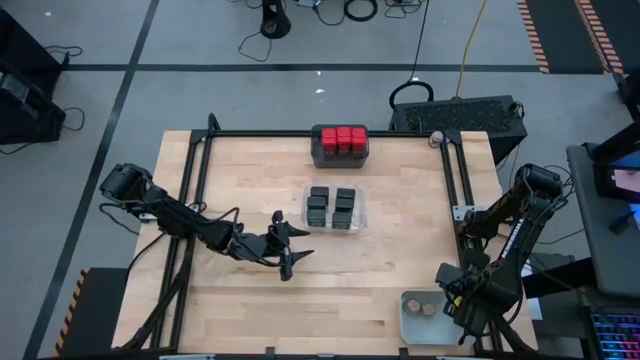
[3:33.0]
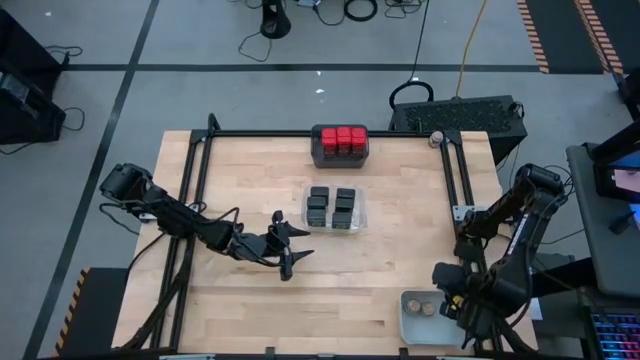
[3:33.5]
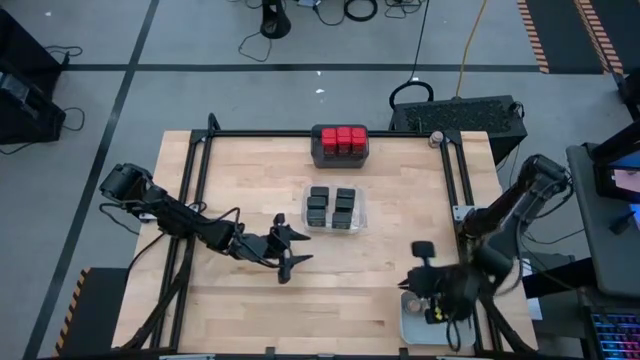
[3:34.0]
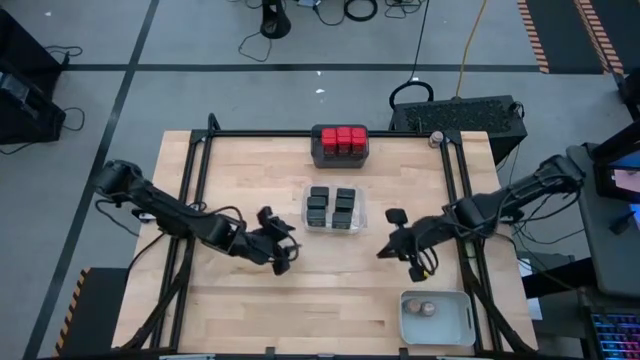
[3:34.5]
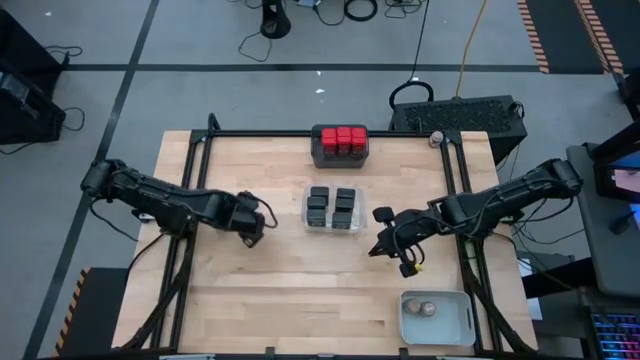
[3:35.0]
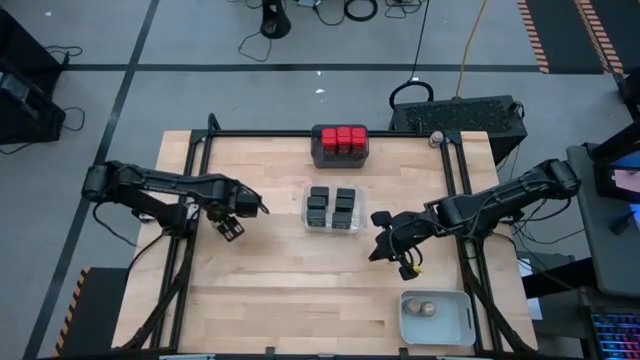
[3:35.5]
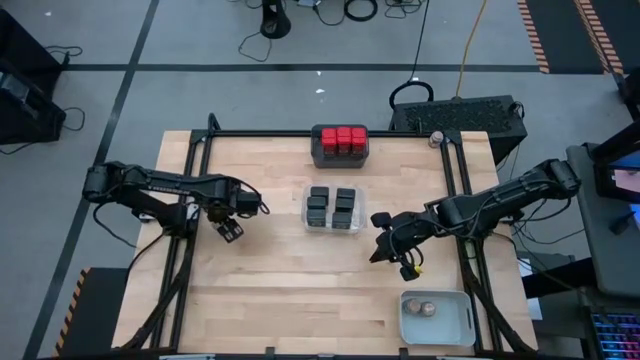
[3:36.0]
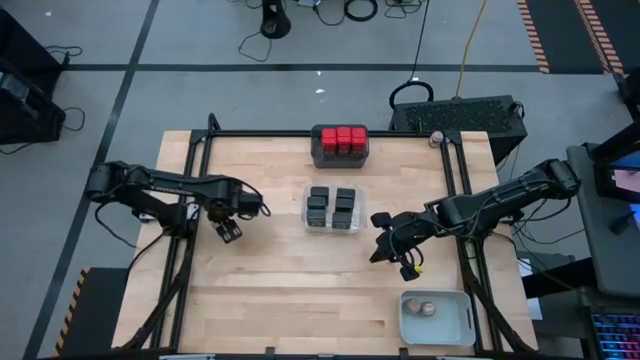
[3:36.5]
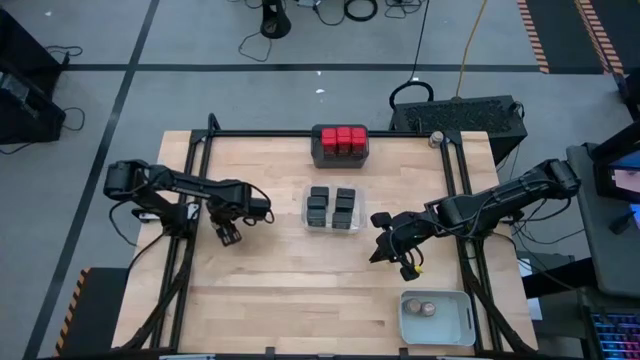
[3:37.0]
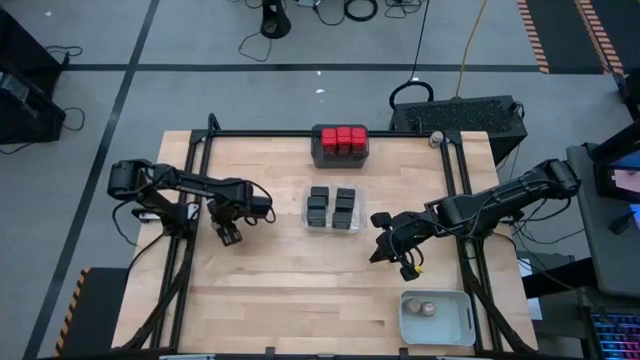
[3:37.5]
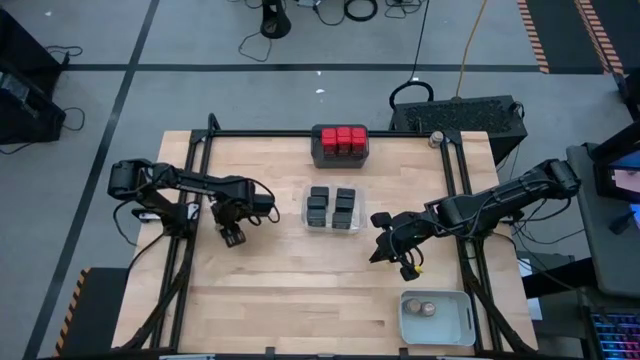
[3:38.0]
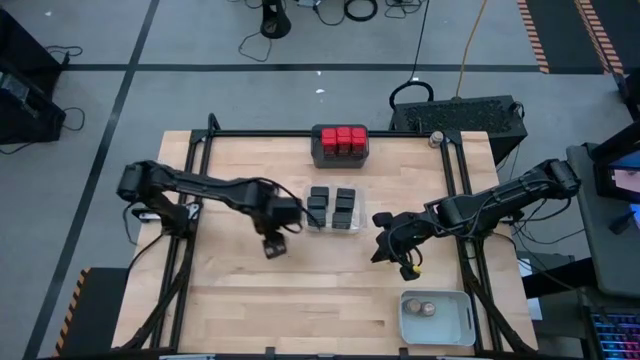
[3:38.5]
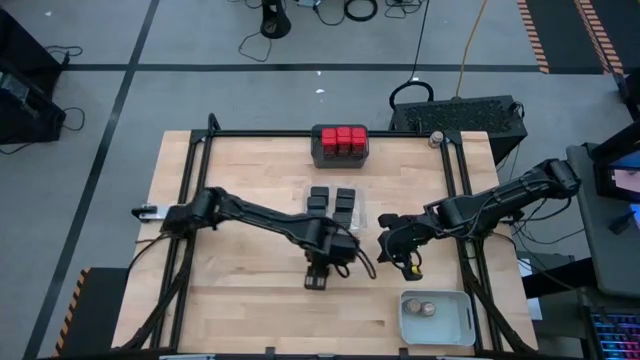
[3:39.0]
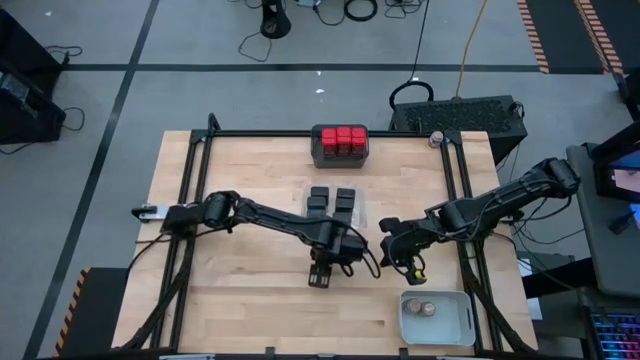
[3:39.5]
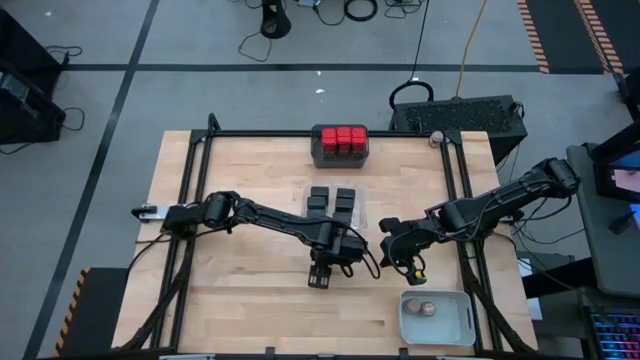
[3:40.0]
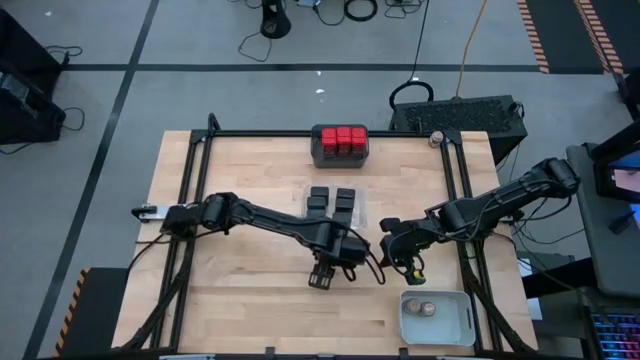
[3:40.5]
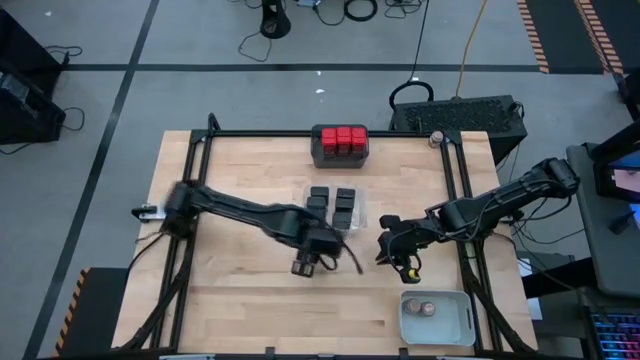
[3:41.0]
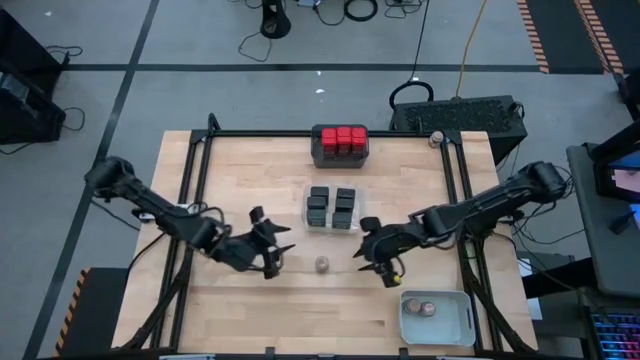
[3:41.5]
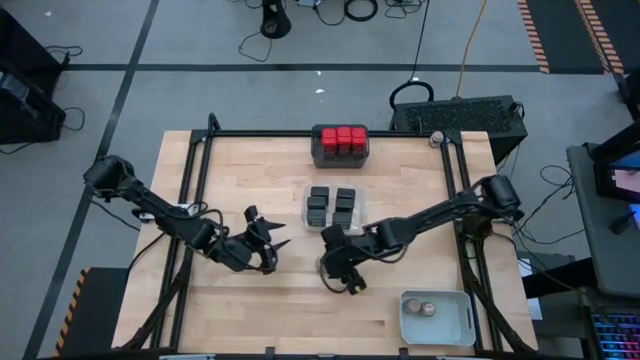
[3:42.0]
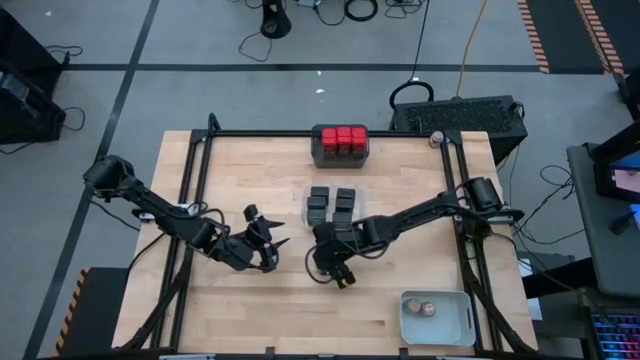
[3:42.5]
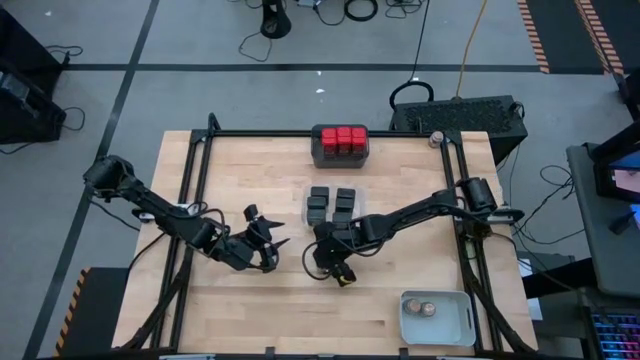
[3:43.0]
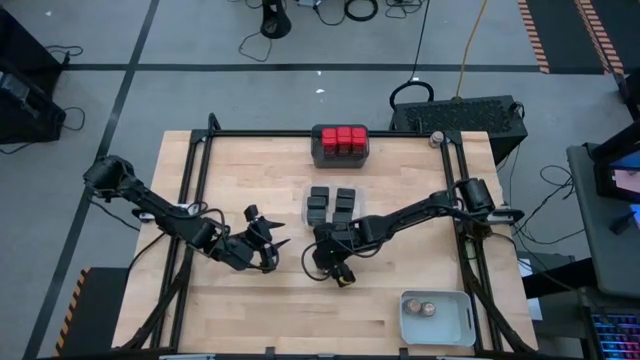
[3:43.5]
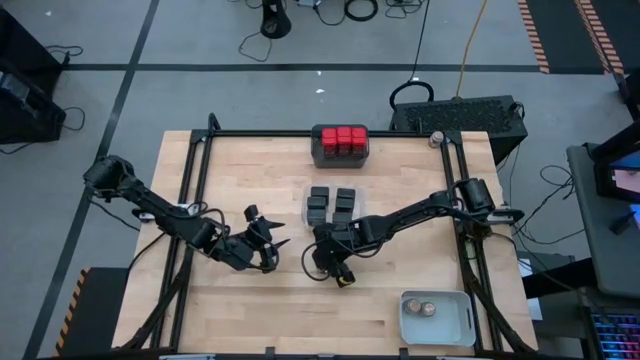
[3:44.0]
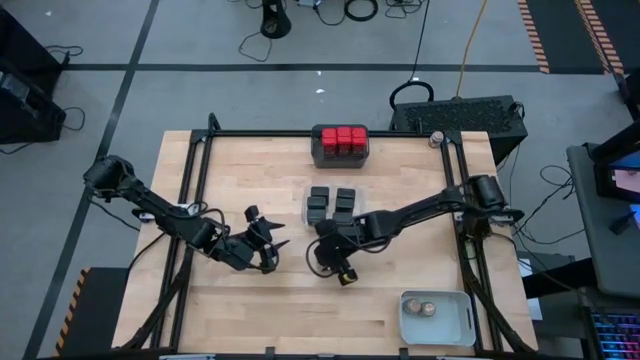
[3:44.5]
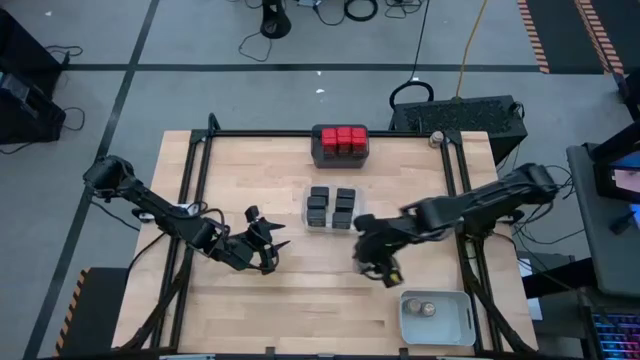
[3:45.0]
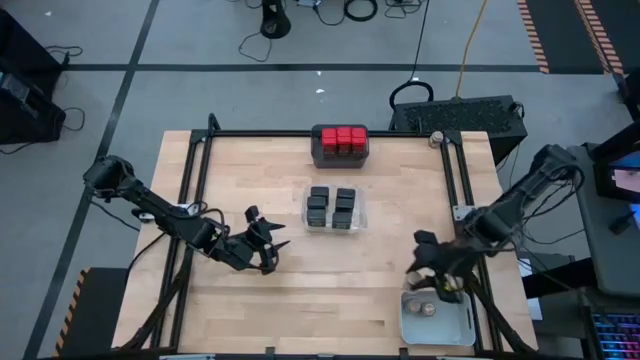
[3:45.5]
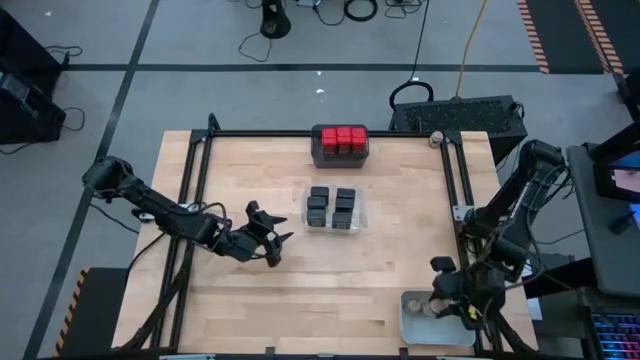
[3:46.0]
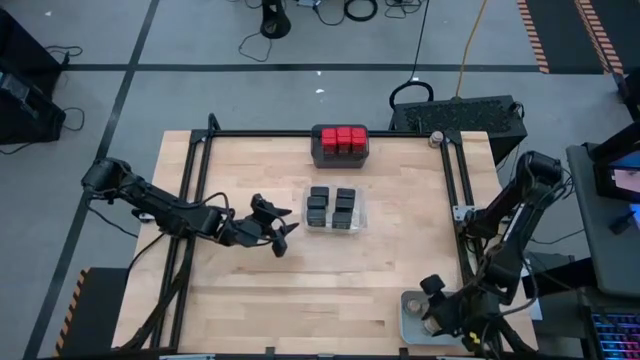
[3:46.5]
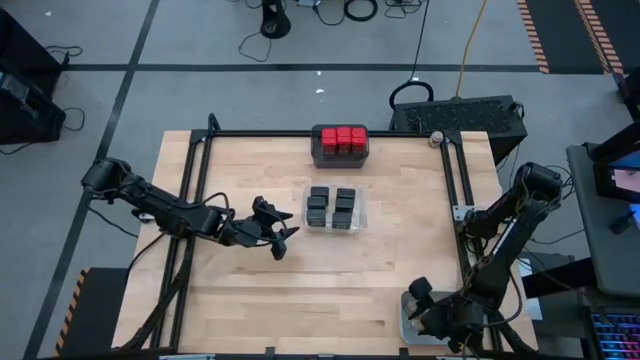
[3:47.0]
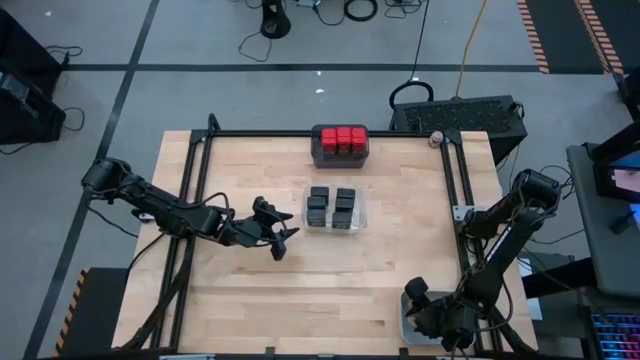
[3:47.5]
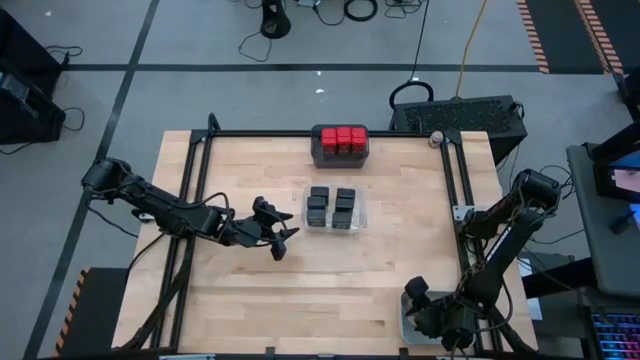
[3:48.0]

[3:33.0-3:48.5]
Task: Sort spices by type
Put the brown seasoning into the white bin

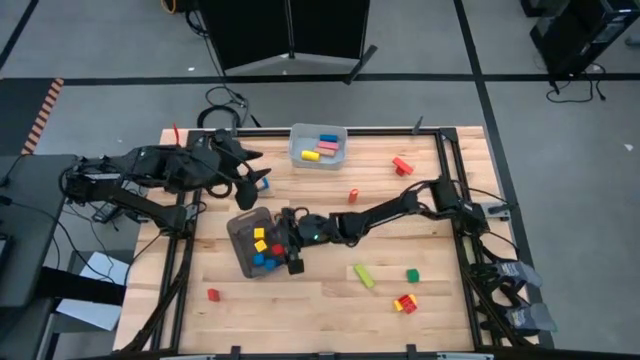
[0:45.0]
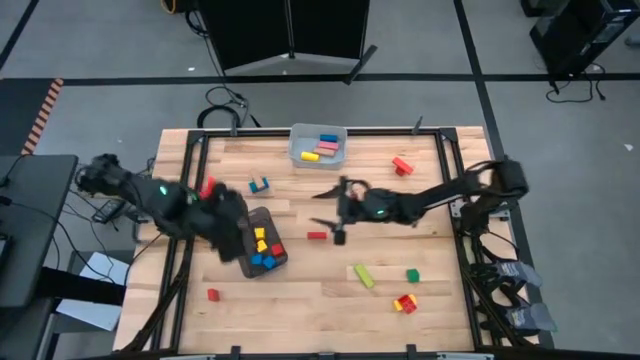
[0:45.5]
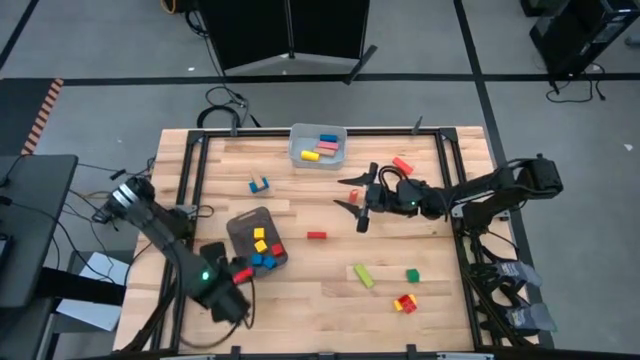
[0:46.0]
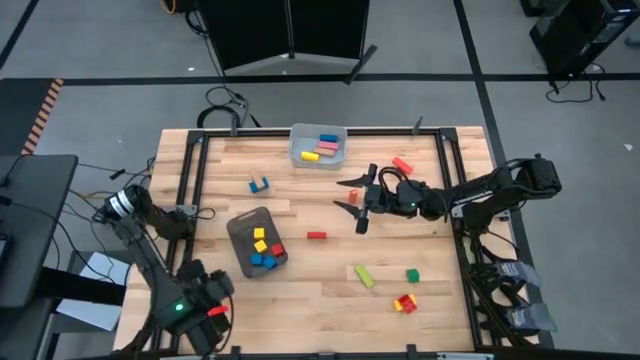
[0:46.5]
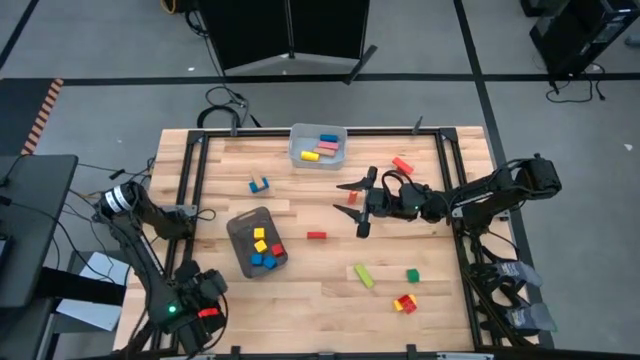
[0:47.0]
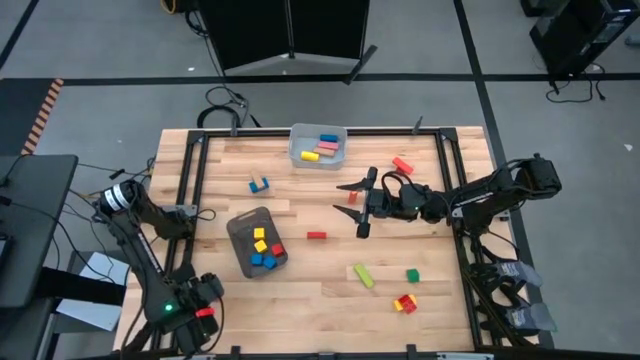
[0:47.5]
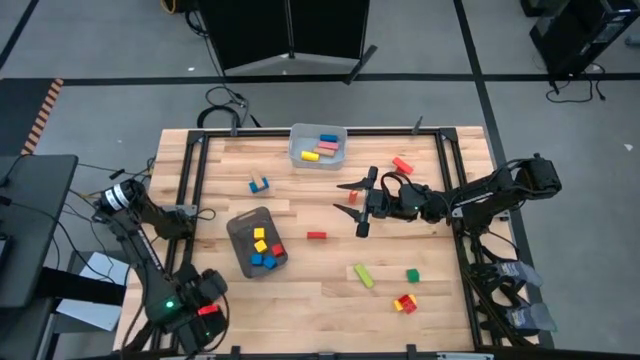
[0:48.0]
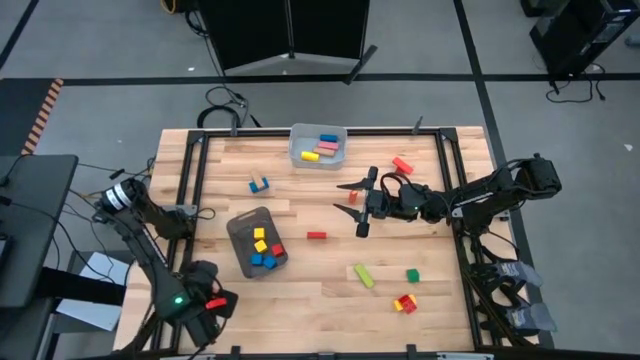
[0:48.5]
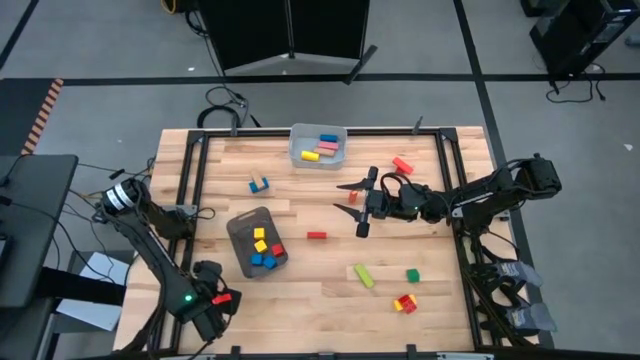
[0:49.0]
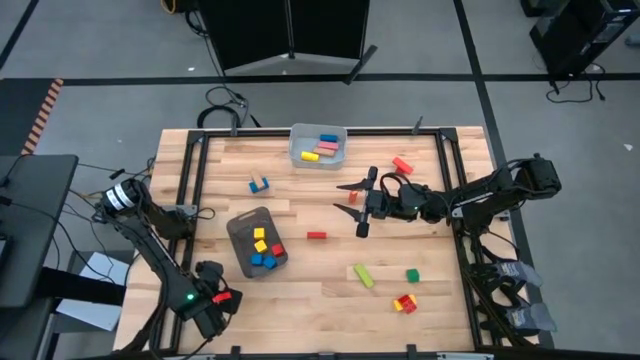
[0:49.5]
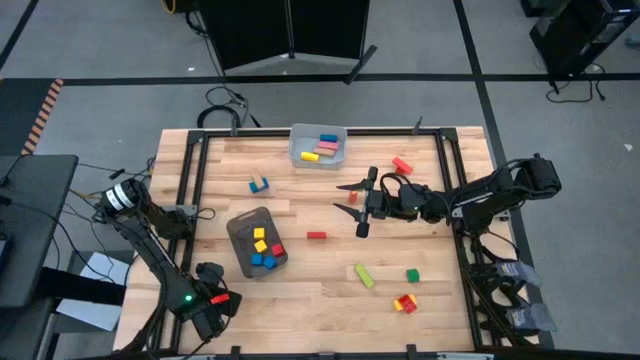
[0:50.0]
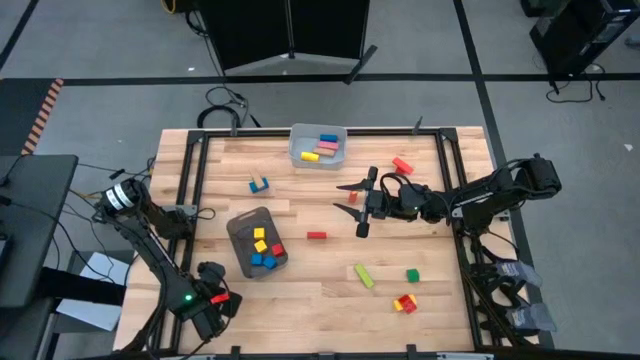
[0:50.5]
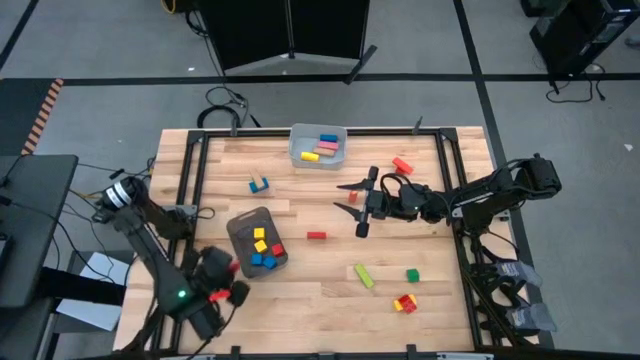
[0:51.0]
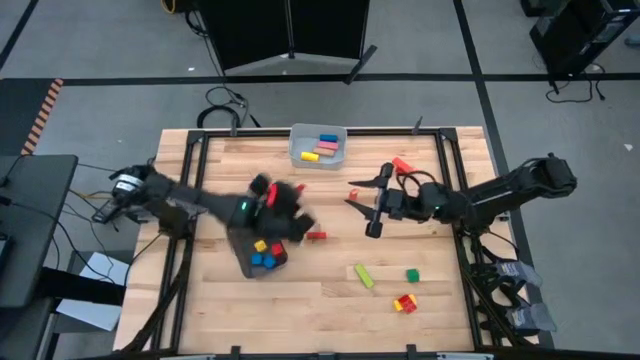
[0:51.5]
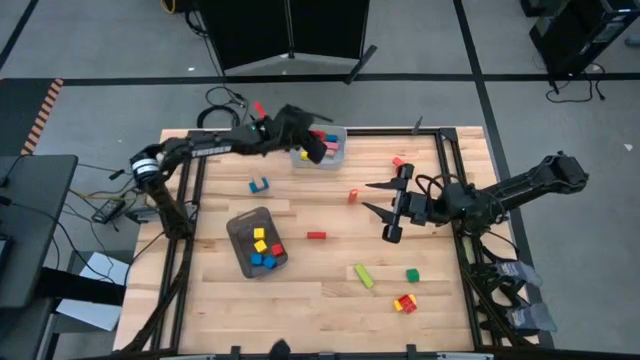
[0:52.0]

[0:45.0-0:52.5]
Task: Sort blocks by size
Put the red rectangular block into the gray bin
